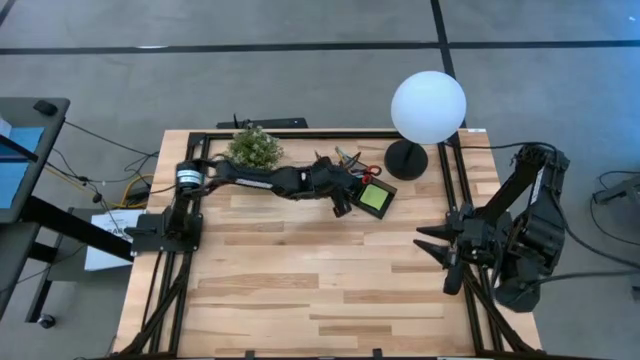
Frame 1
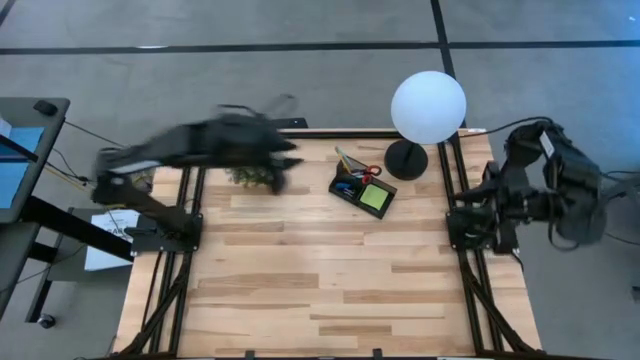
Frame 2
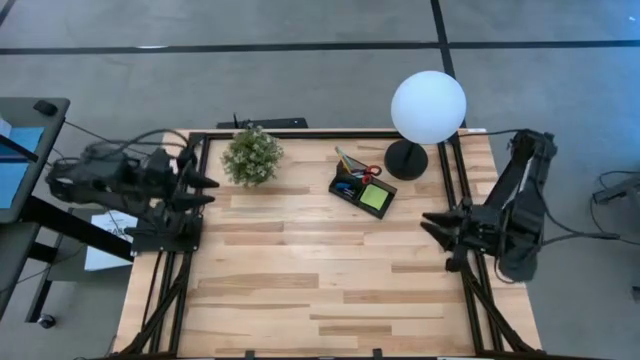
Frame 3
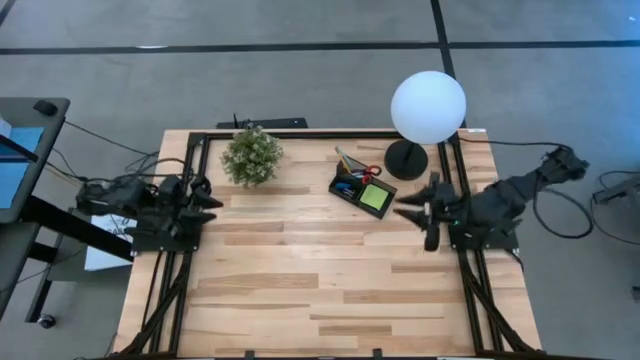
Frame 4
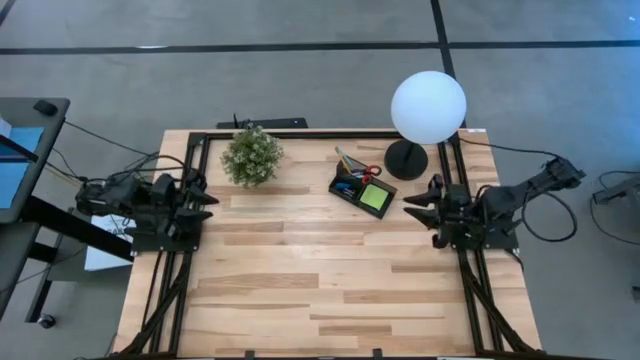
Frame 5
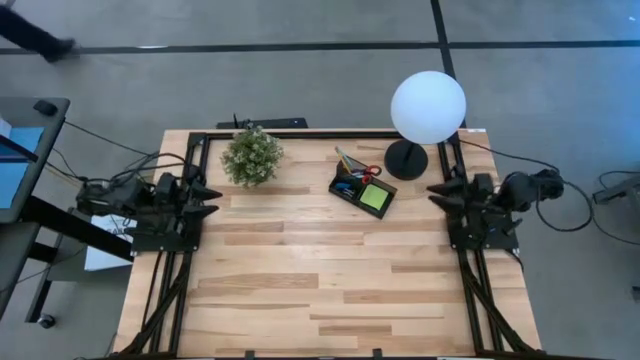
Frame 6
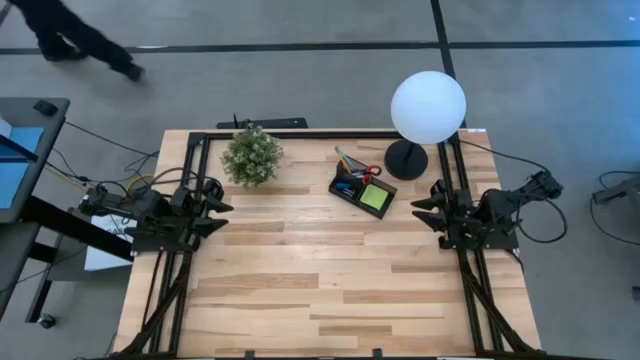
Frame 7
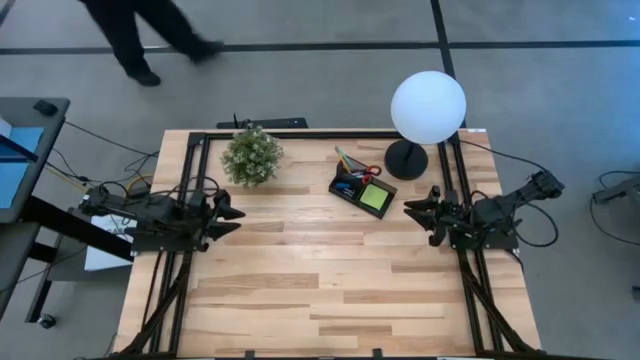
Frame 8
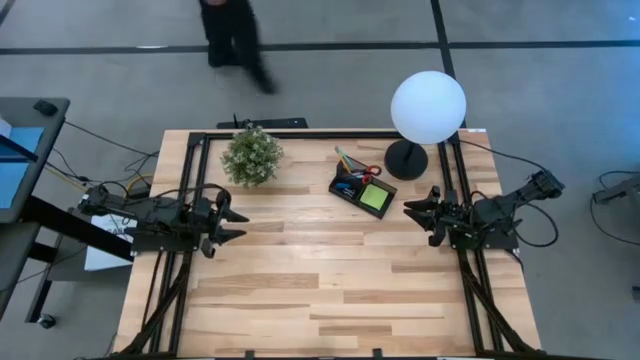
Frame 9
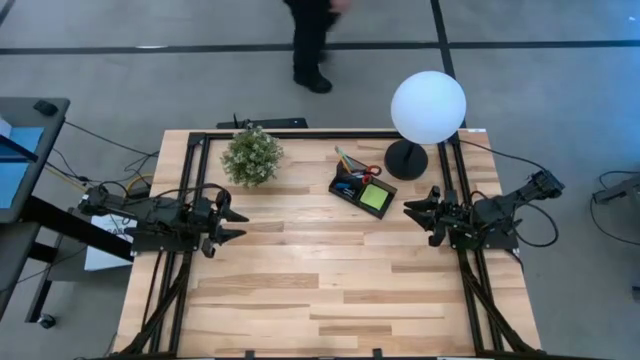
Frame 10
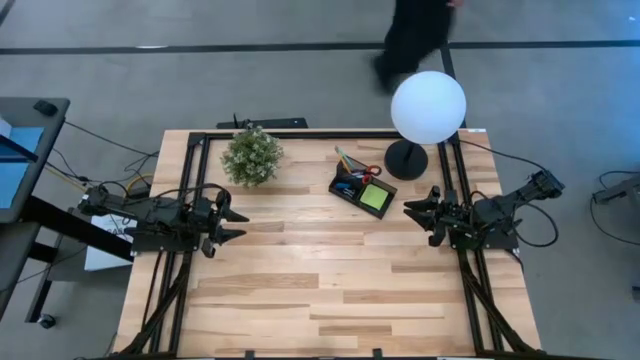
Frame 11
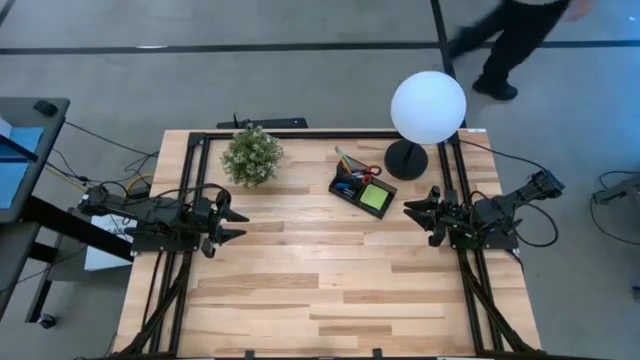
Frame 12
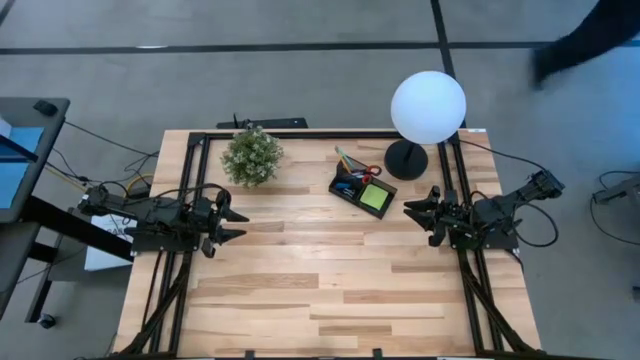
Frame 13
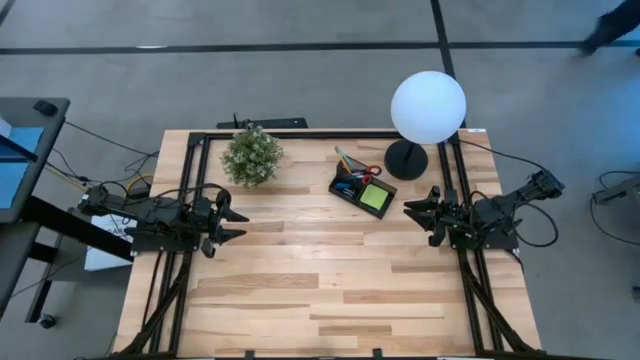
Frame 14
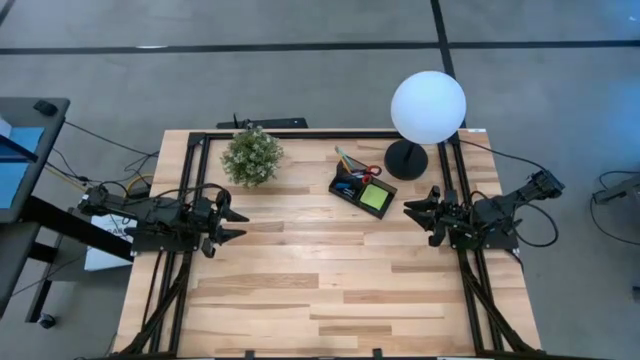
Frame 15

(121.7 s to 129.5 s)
Task: Pick and place office supplies into organizer
Return to Home Position

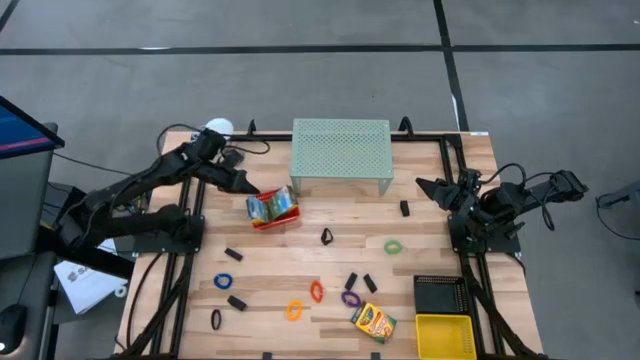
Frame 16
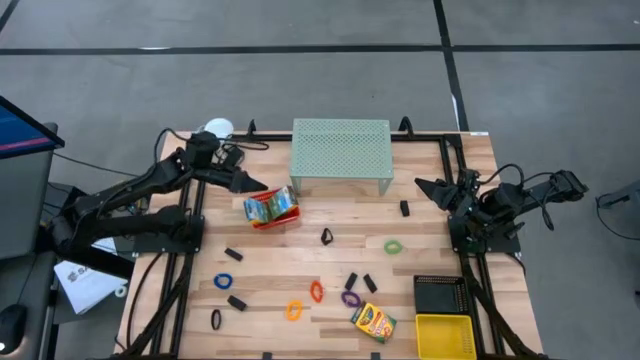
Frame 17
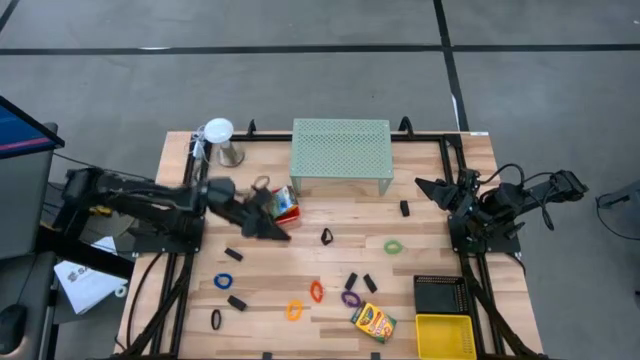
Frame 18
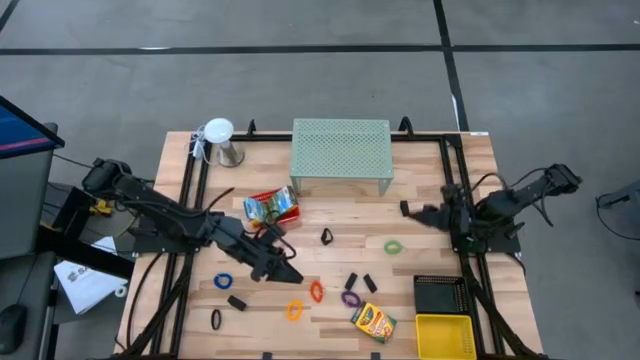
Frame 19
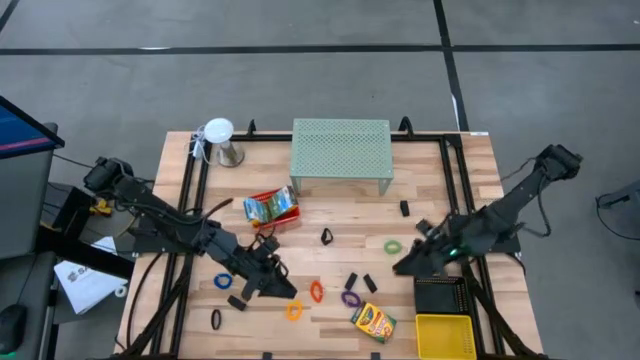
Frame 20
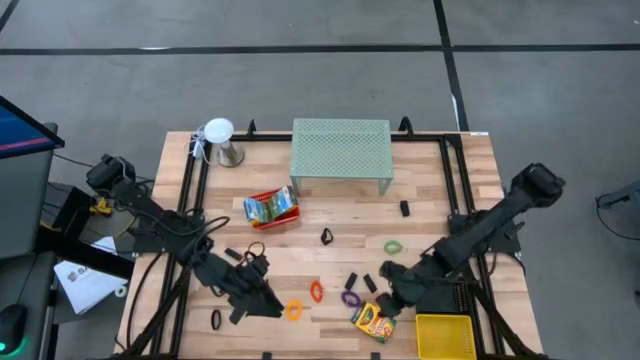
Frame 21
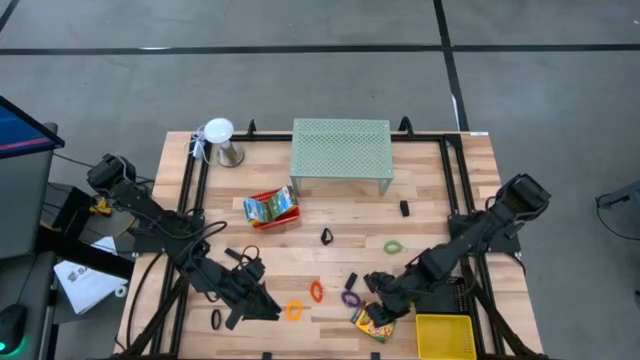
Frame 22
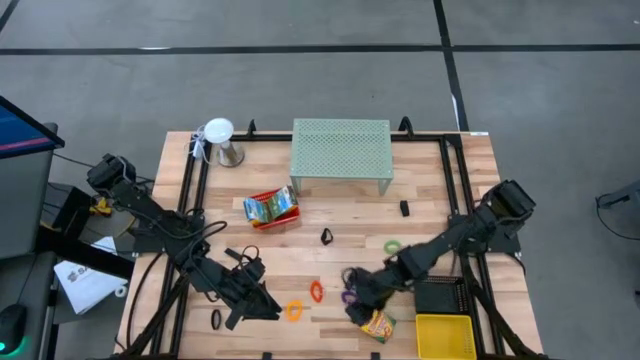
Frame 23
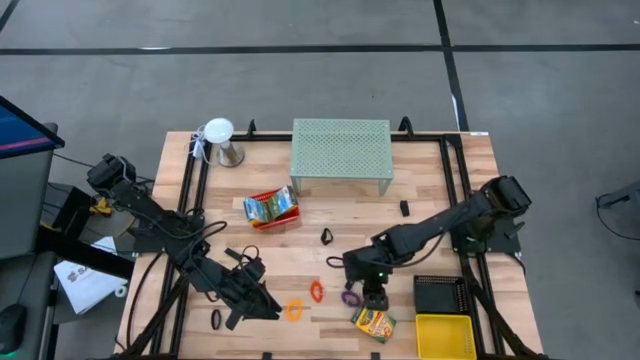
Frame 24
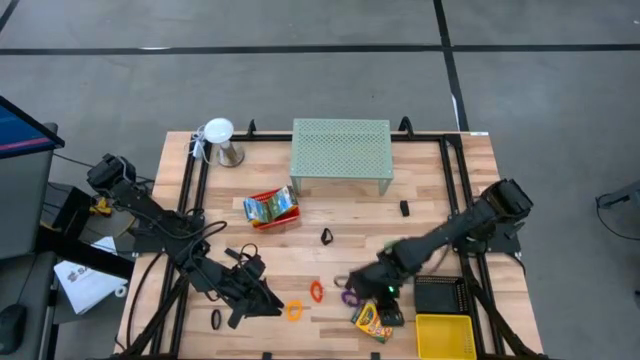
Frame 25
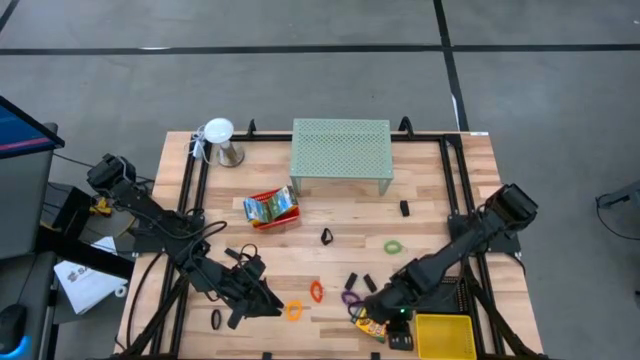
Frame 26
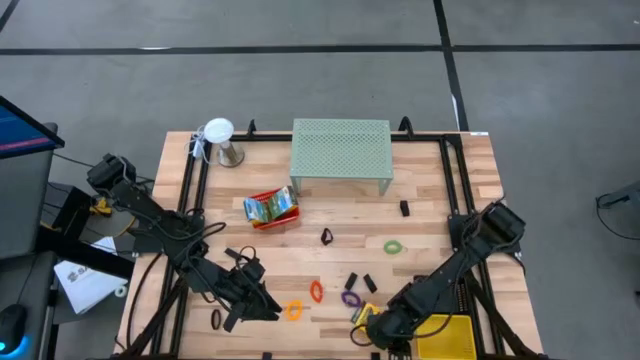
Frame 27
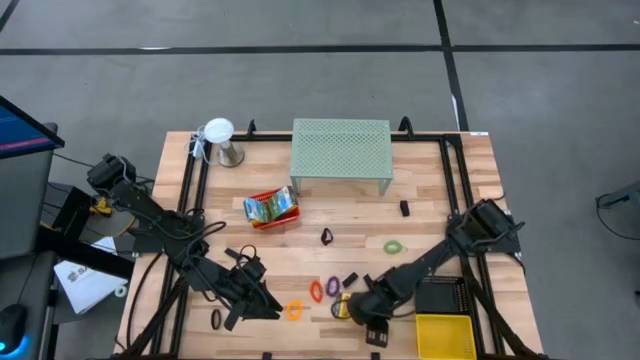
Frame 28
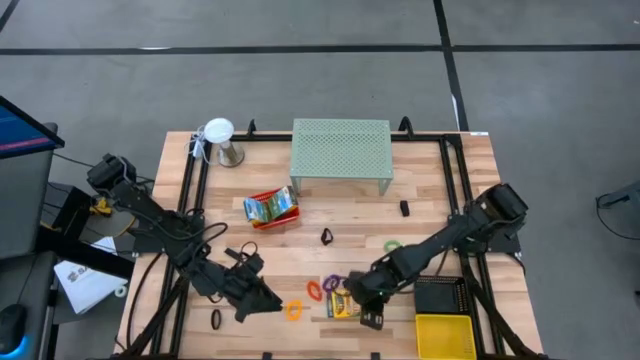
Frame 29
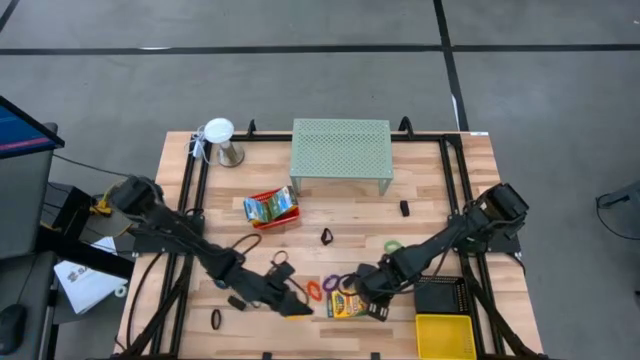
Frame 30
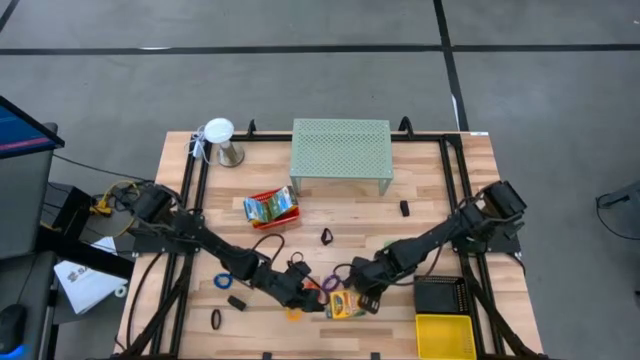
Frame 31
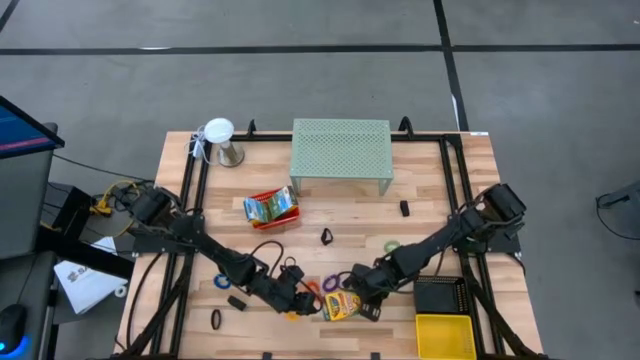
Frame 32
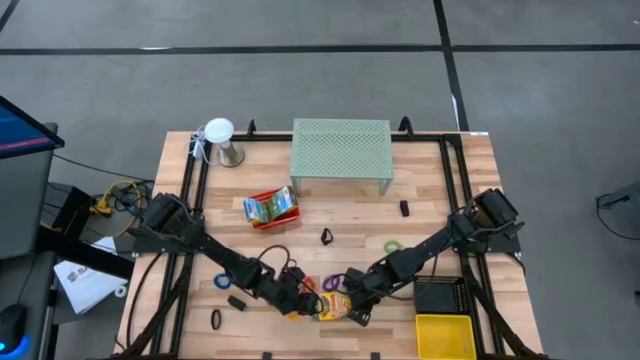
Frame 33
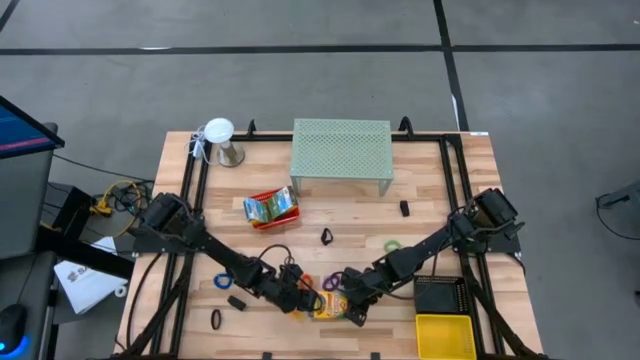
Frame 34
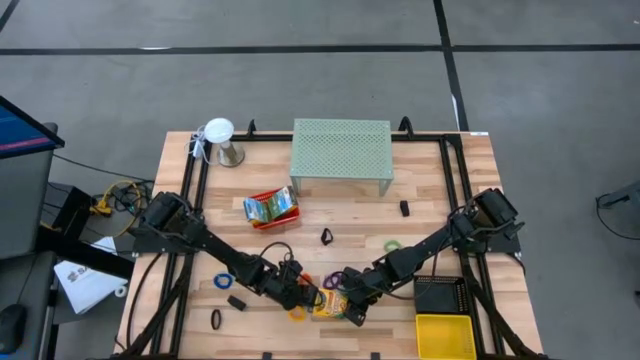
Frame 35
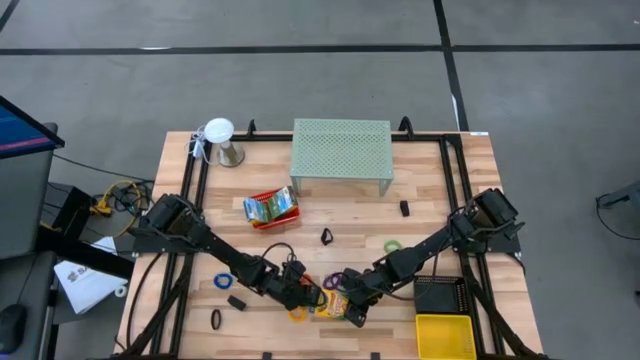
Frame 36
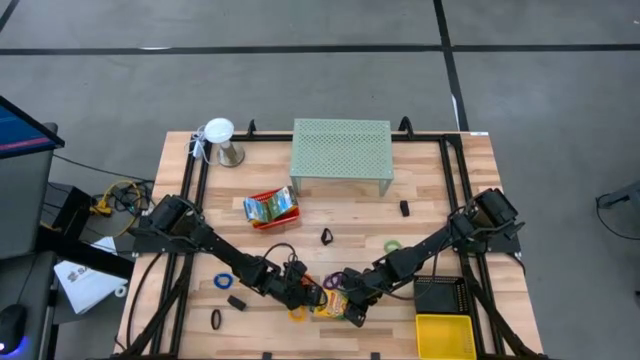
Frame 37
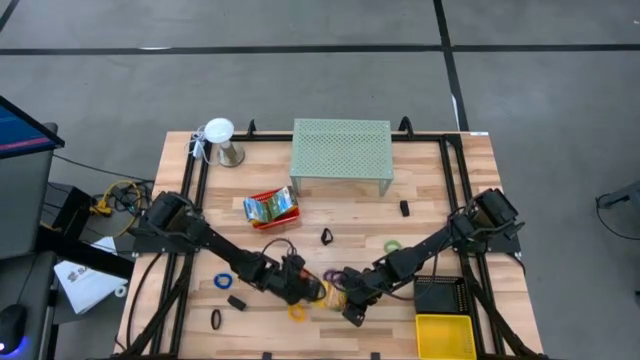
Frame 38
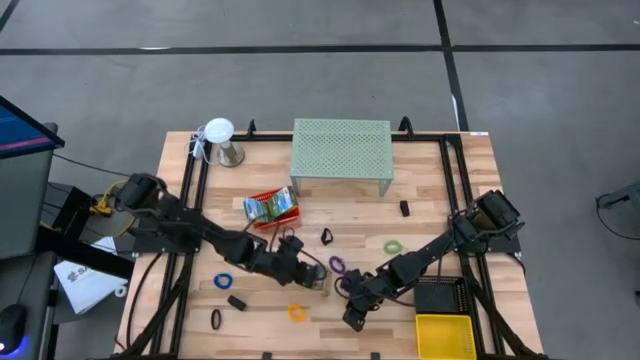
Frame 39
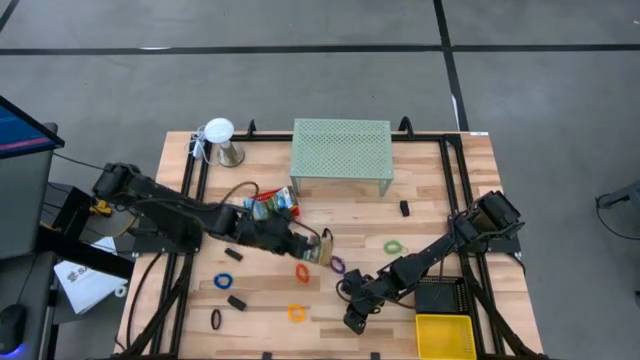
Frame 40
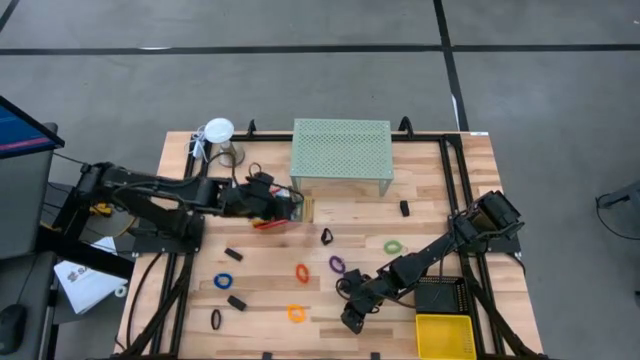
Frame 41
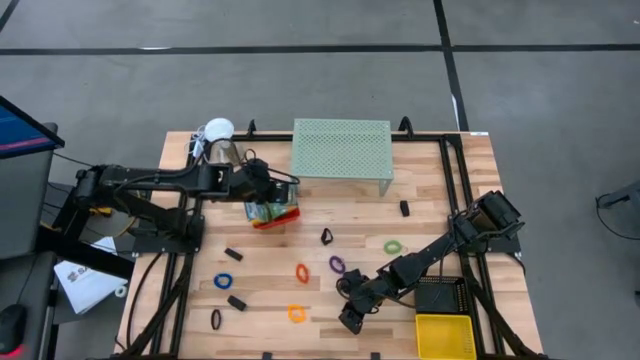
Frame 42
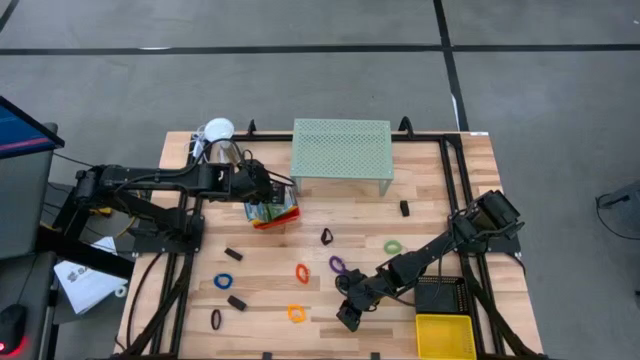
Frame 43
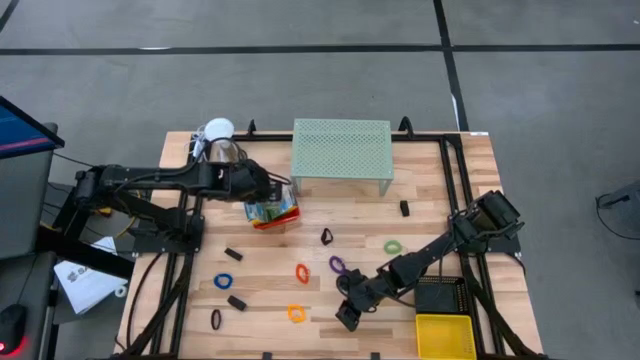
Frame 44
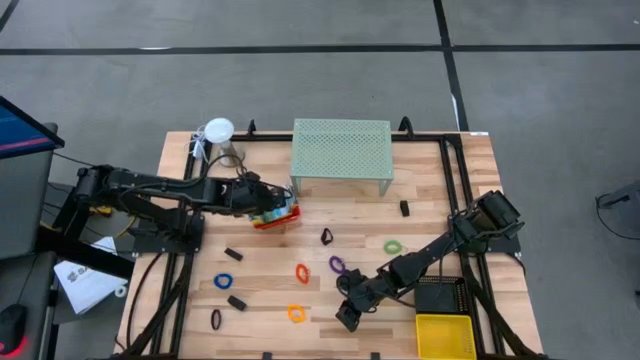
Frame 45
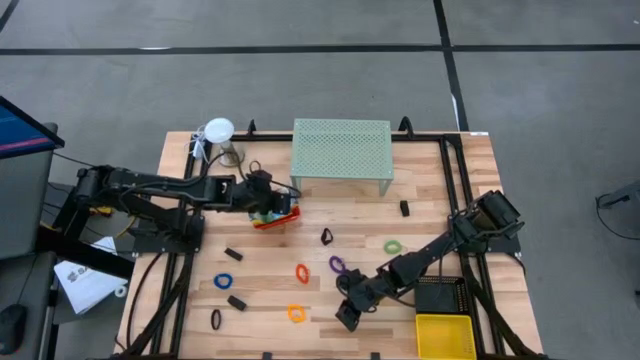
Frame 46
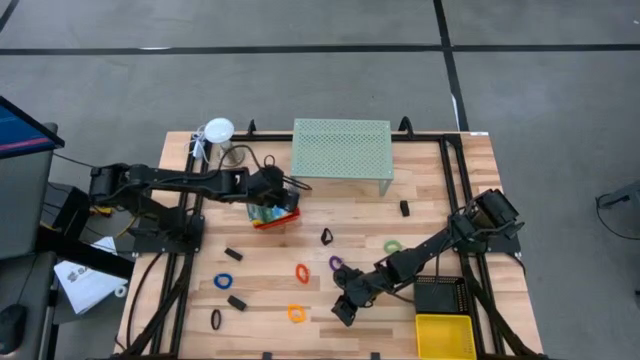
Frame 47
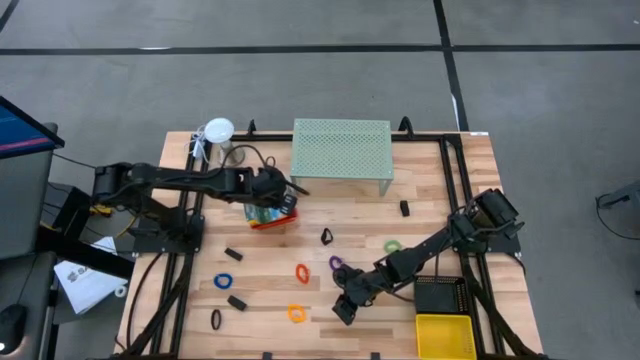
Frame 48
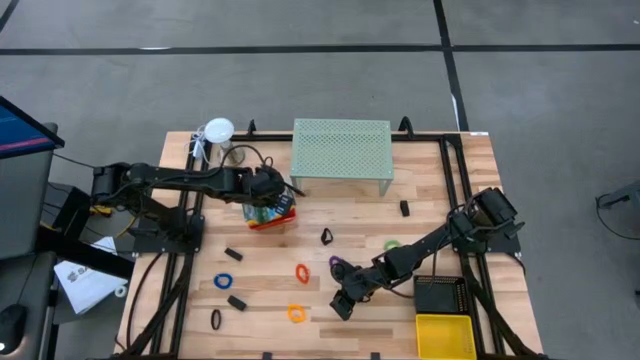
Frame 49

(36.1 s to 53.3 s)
Task: Pick & Place Office Desk Supplies
Put the yellow crayon box into the red bin
